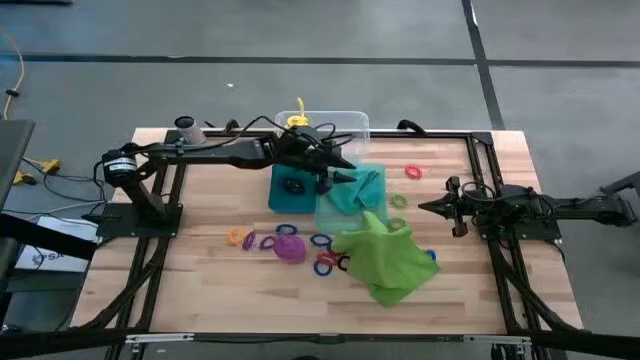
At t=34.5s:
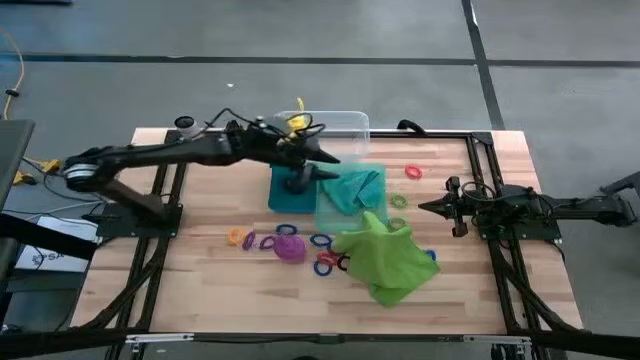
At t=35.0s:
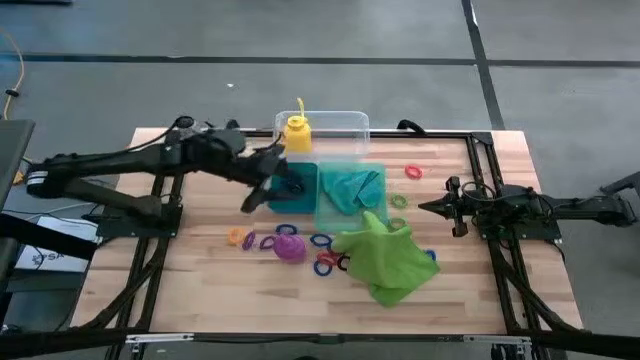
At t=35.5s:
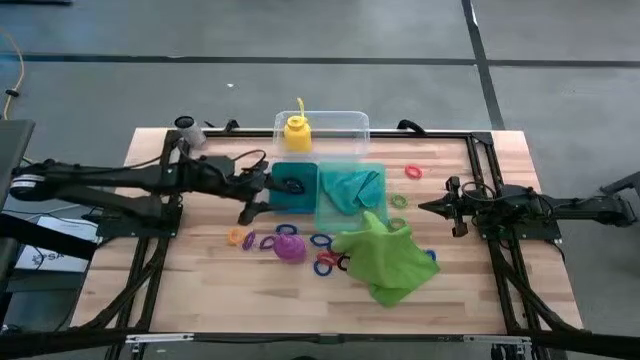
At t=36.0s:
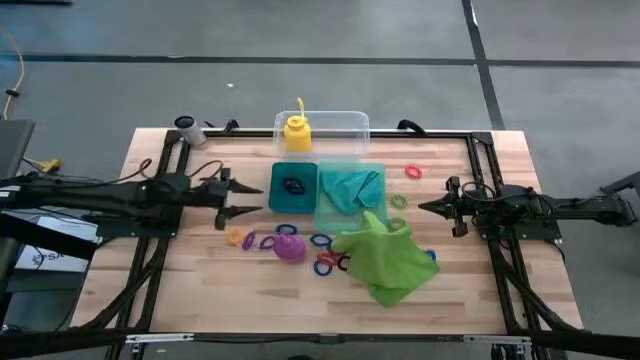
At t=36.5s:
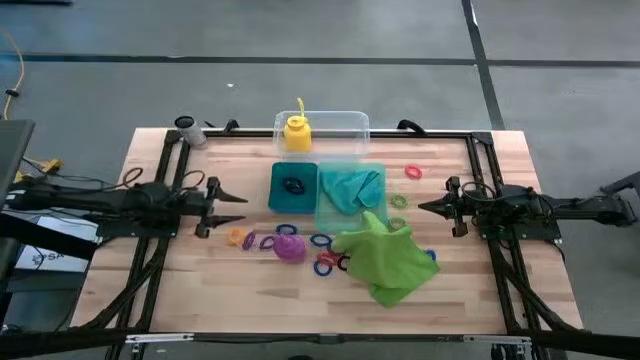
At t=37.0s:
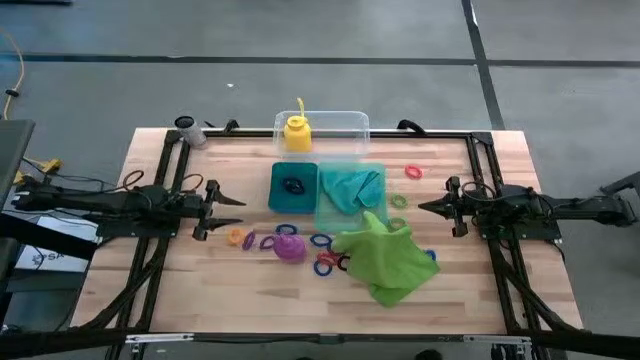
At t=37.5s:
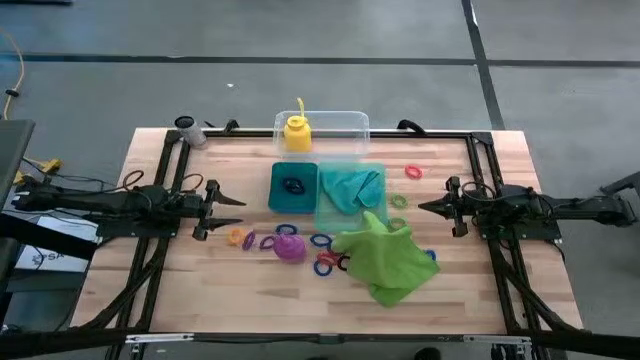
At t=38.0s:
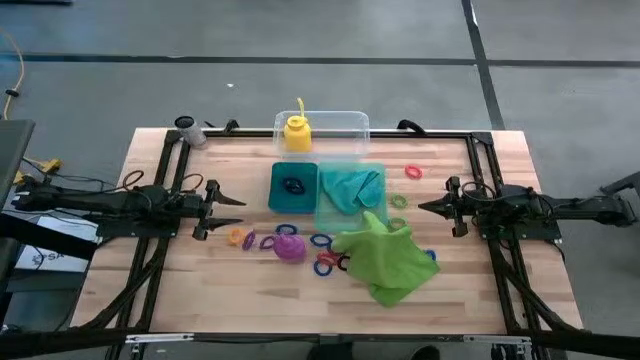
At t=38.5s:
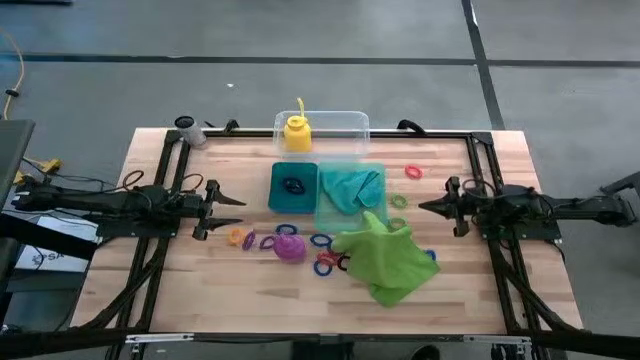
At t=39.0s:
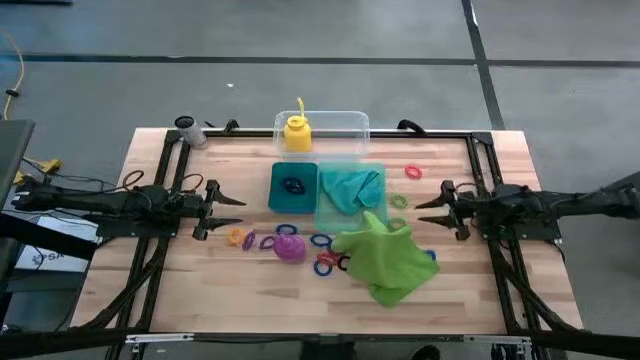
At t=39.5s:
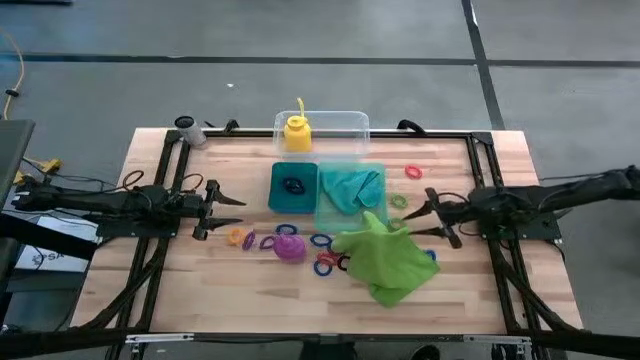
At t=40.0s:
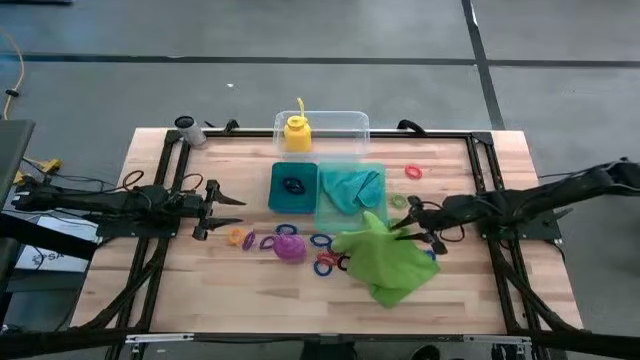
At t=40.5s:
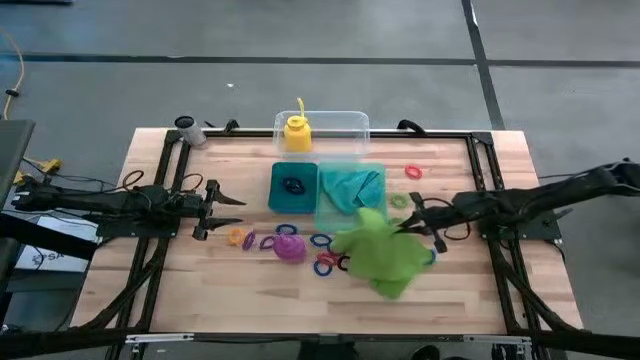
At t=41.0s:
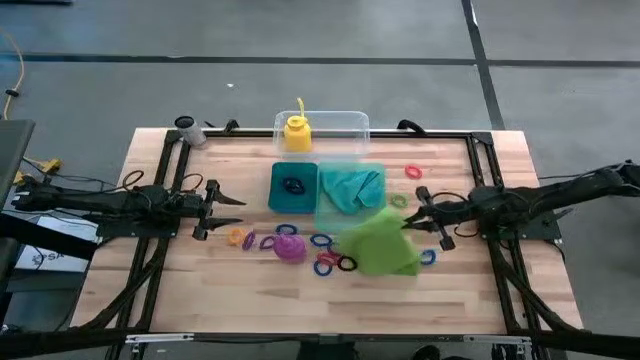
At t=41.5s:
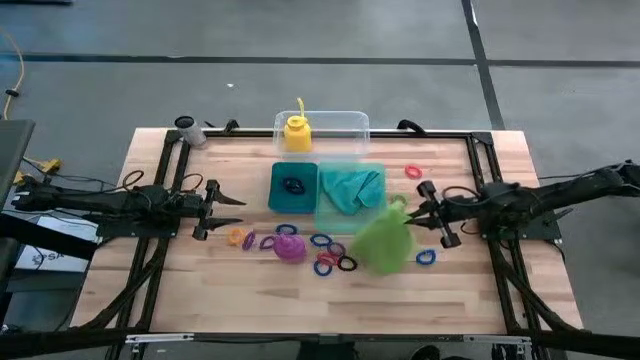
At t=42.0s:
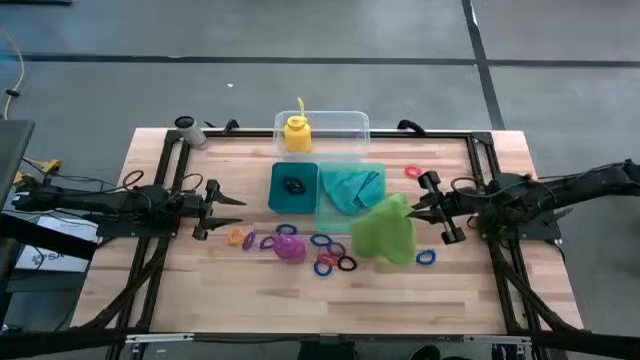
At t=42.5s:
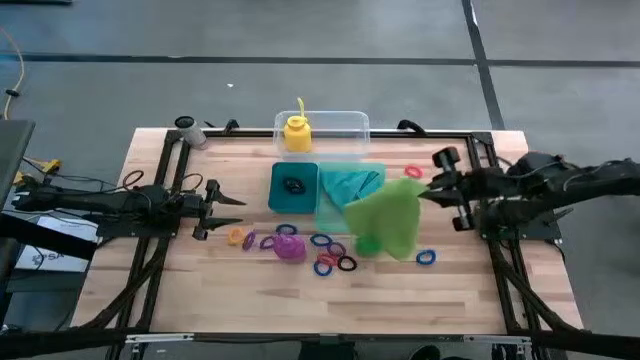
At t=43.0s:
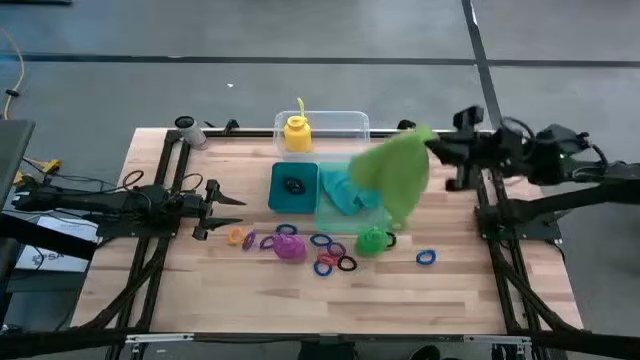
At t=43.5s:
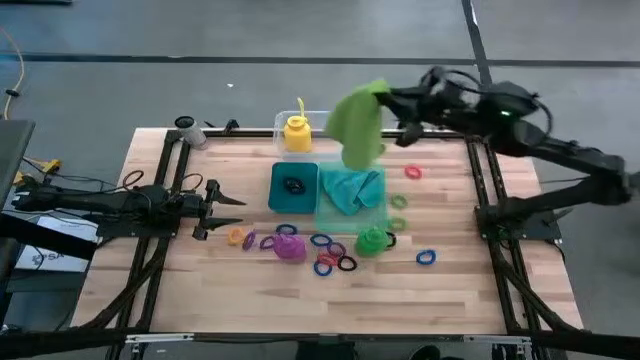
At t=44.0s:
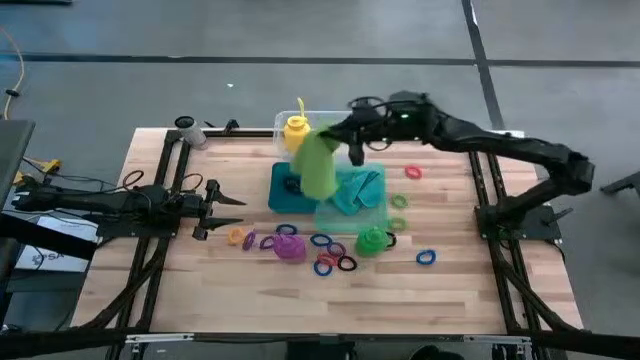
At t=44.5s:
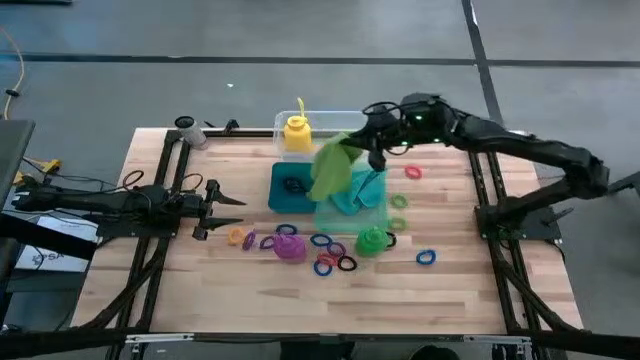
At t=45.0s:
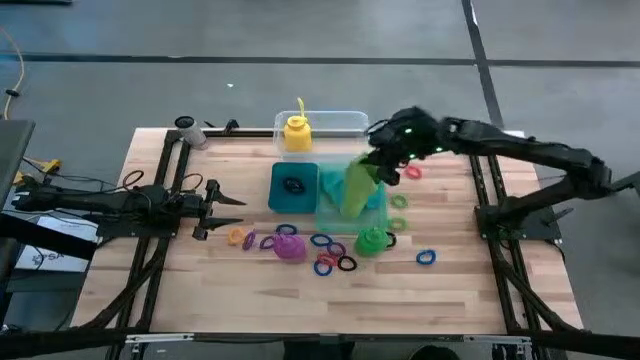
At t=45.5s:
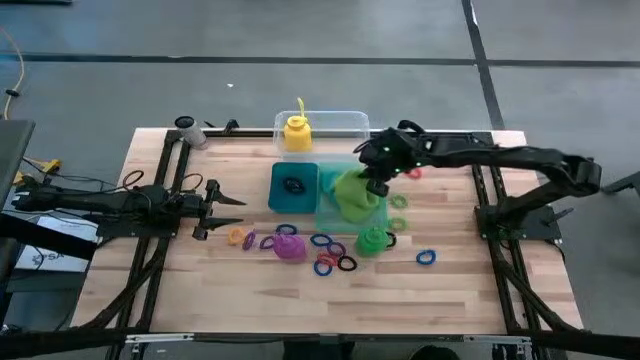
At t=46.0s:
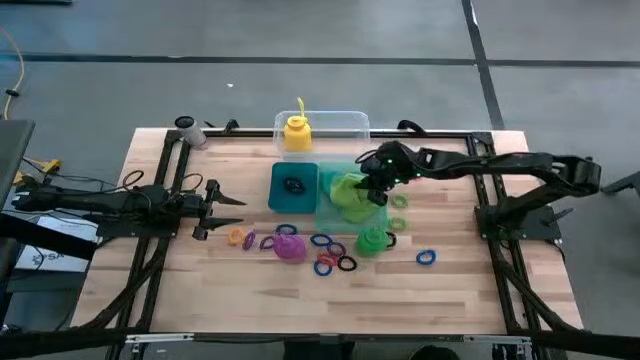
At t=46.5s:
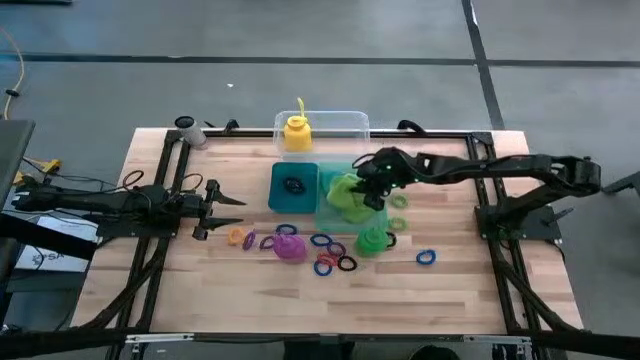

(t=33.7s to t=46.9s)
Task: Pick & Place Sports Items
Put the green towel into the green bin

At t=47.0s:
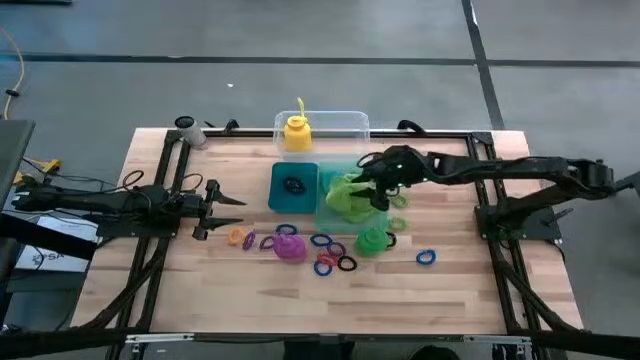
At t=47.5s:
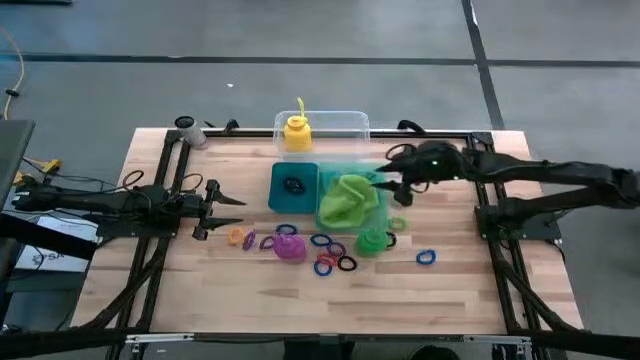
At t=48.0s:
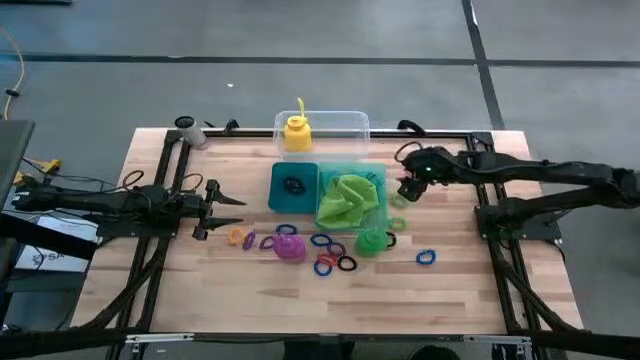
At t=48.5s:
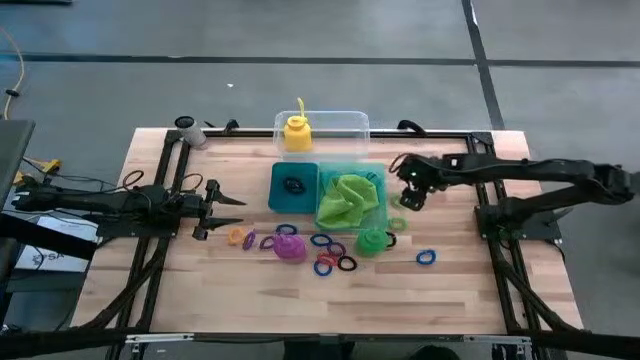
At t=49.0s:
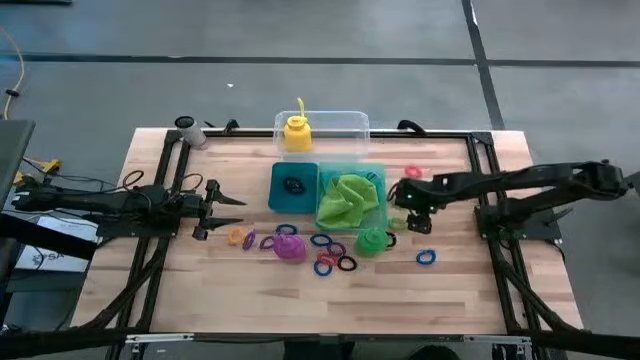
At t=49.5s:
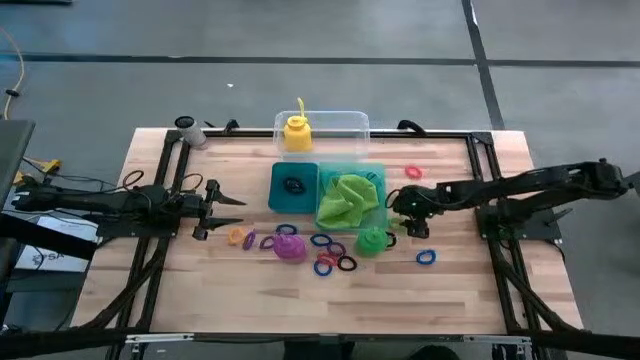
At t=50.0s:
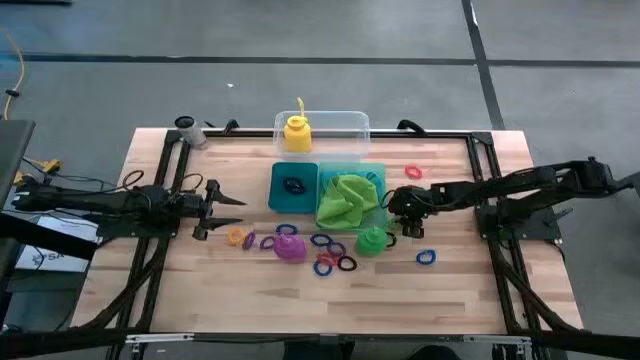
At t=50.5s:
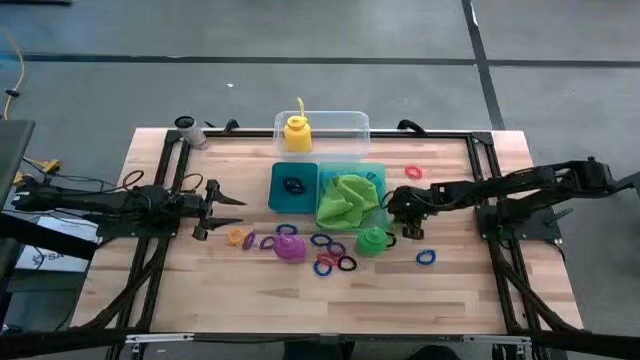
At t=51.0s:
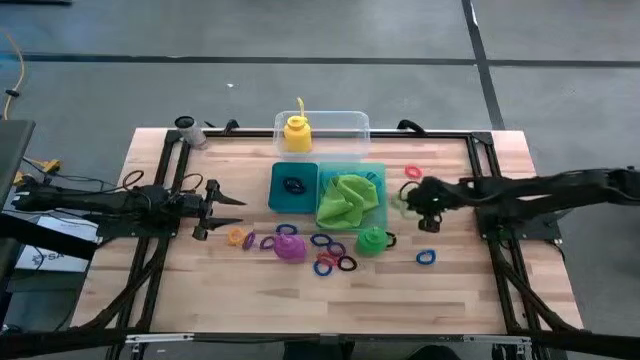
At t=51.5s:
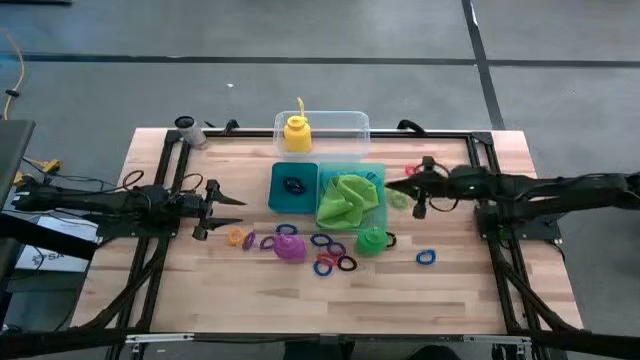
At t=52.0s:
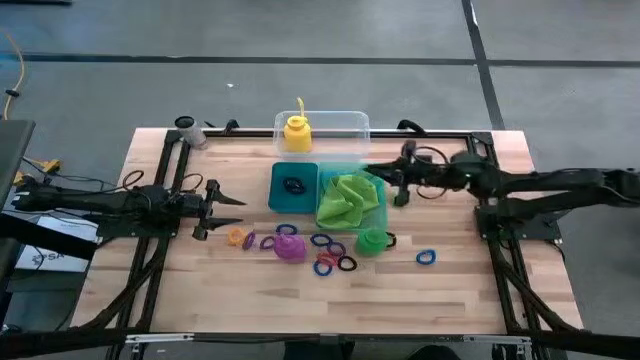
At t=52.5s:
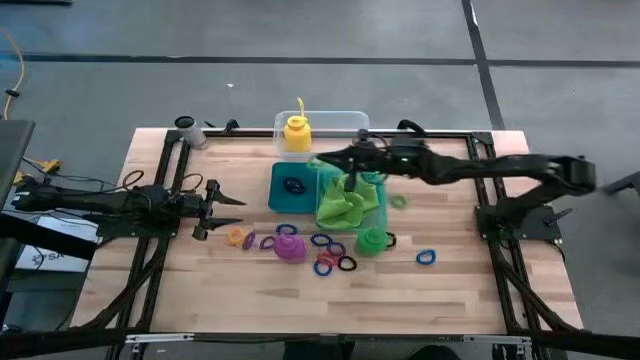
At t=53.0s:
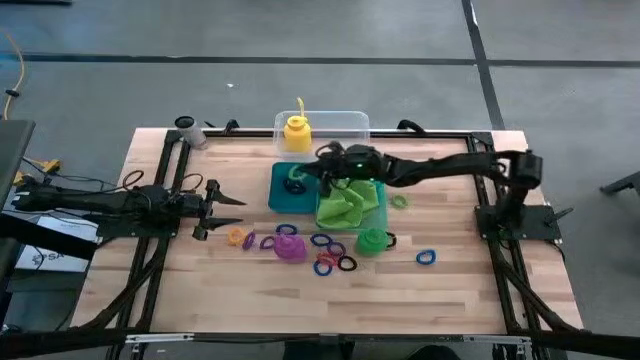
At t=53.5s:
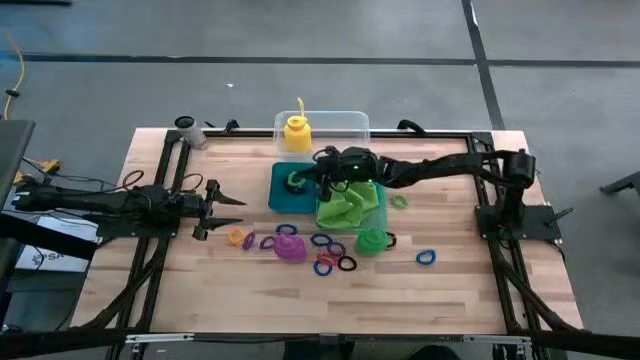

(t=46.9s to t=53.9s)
Put the bottom green spring keychain into the blue bin
